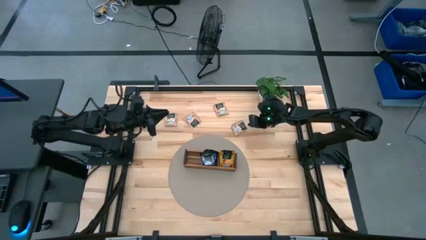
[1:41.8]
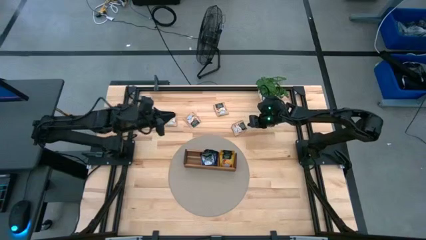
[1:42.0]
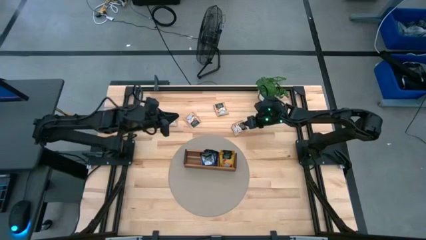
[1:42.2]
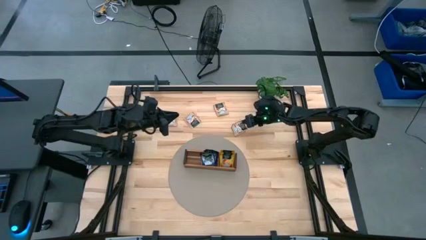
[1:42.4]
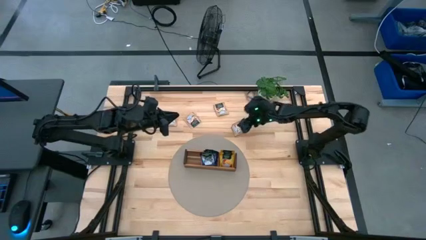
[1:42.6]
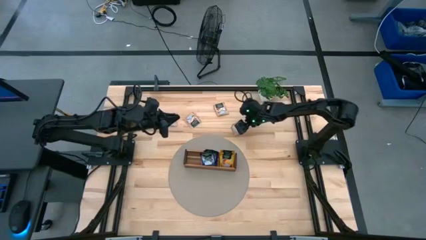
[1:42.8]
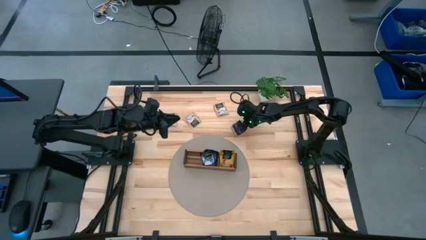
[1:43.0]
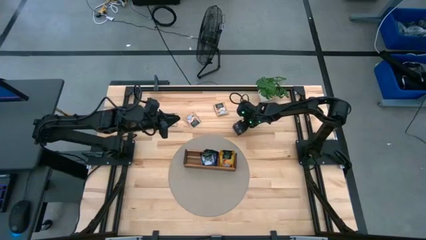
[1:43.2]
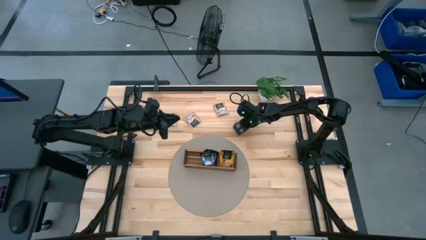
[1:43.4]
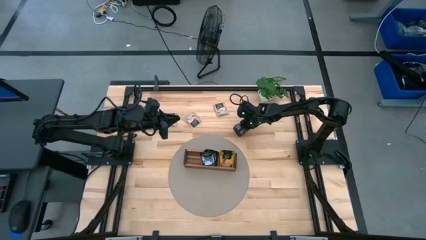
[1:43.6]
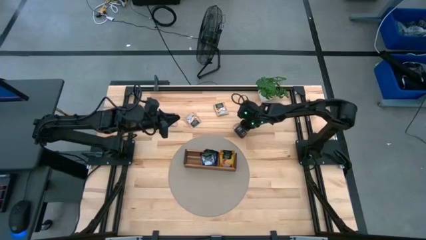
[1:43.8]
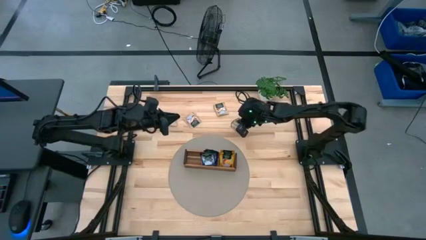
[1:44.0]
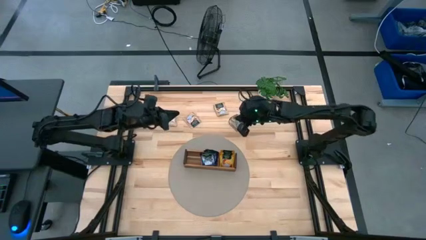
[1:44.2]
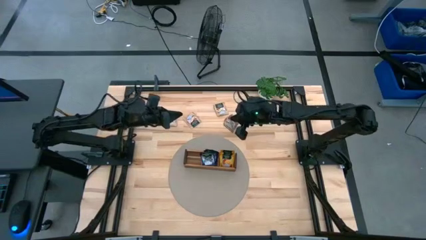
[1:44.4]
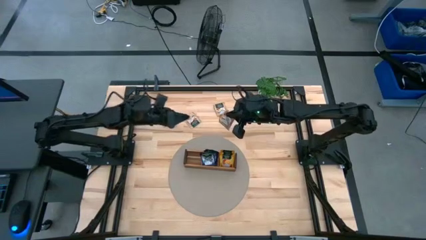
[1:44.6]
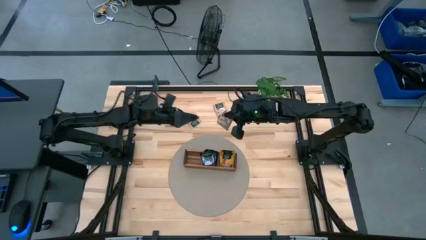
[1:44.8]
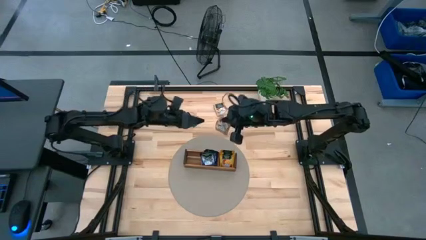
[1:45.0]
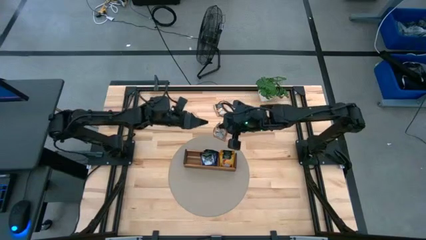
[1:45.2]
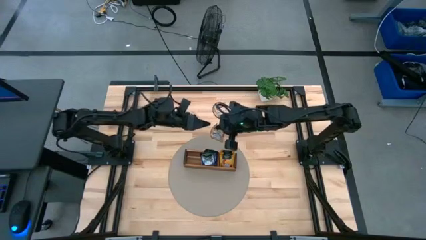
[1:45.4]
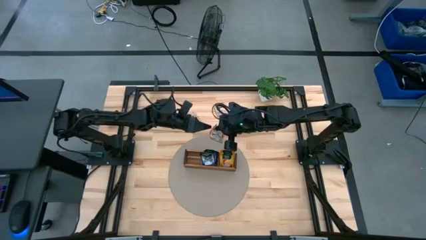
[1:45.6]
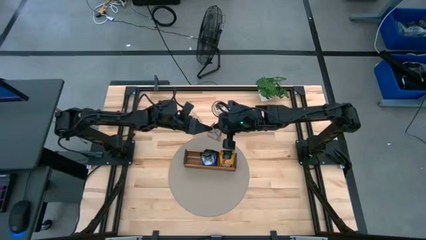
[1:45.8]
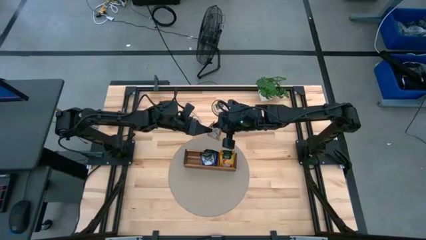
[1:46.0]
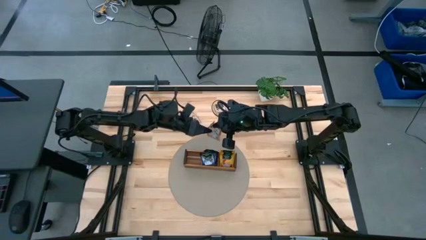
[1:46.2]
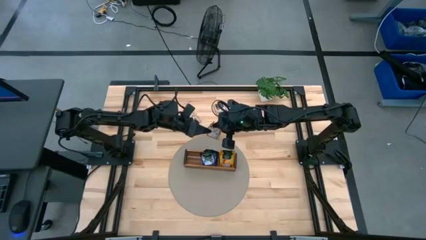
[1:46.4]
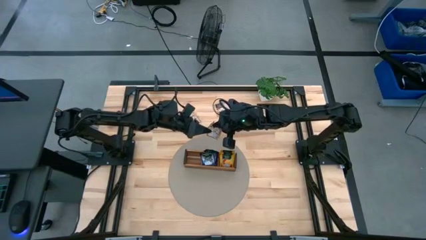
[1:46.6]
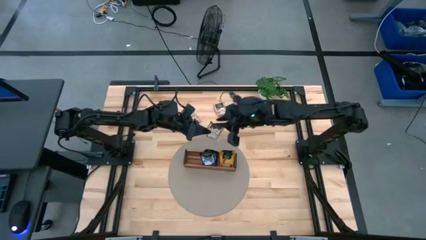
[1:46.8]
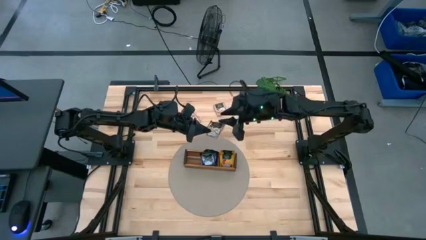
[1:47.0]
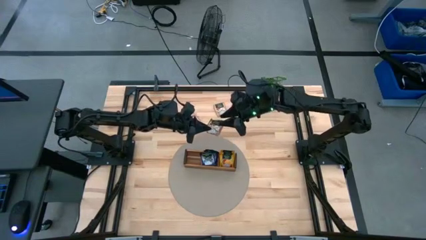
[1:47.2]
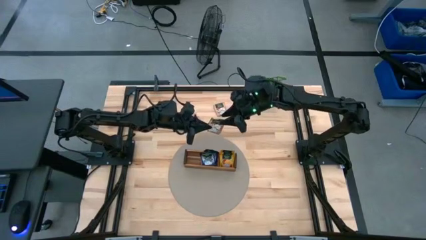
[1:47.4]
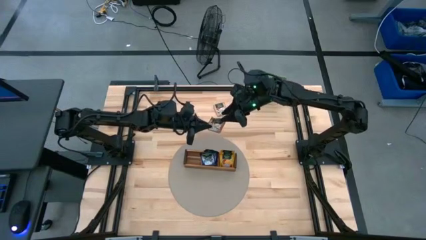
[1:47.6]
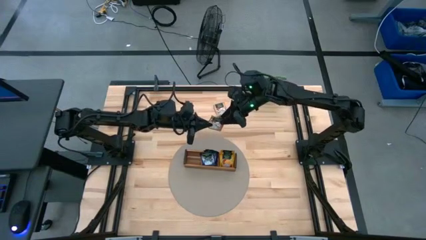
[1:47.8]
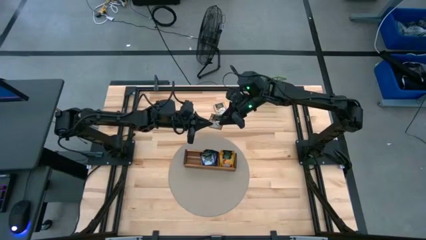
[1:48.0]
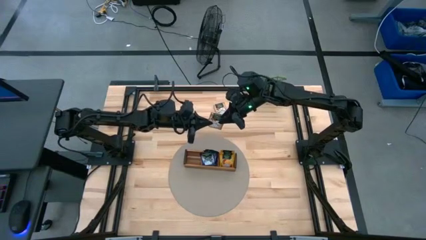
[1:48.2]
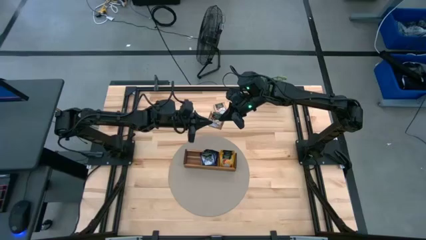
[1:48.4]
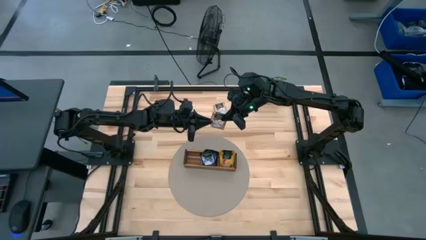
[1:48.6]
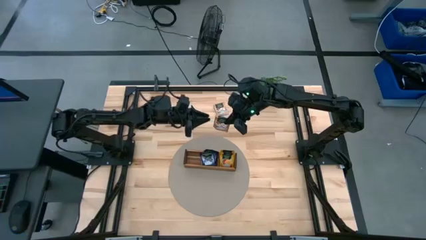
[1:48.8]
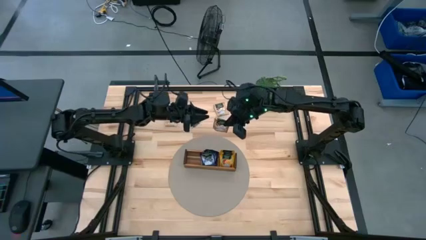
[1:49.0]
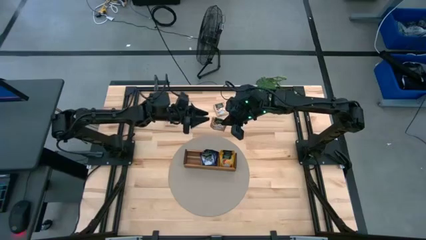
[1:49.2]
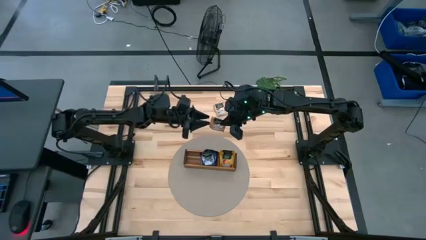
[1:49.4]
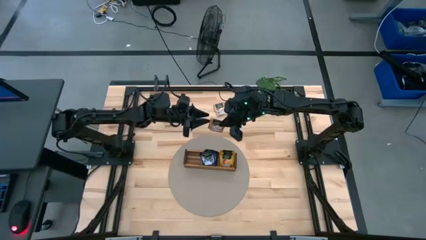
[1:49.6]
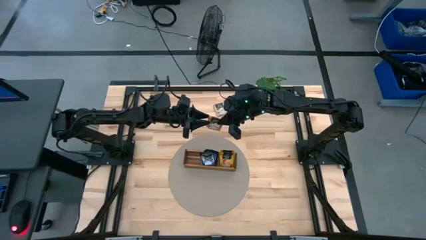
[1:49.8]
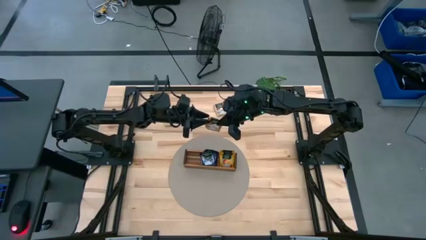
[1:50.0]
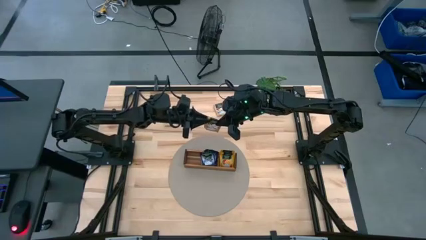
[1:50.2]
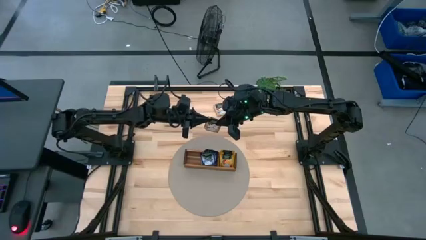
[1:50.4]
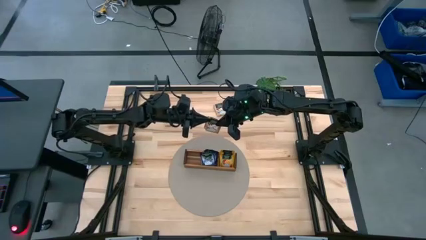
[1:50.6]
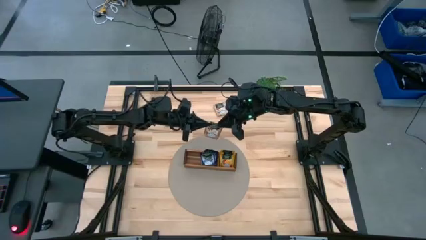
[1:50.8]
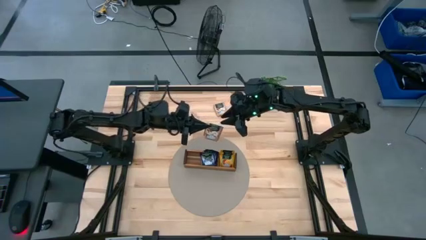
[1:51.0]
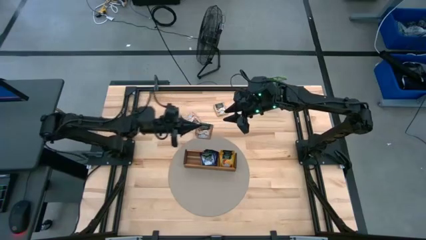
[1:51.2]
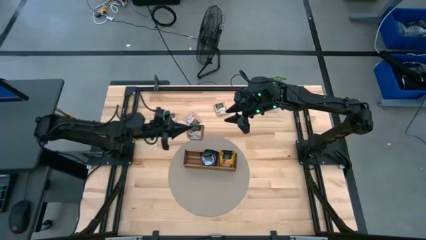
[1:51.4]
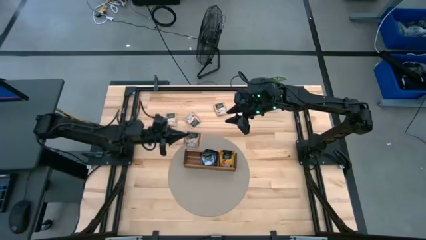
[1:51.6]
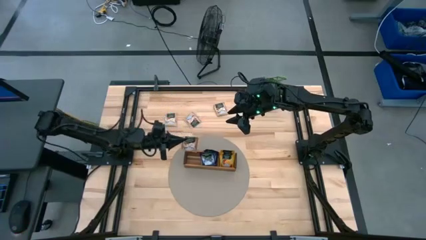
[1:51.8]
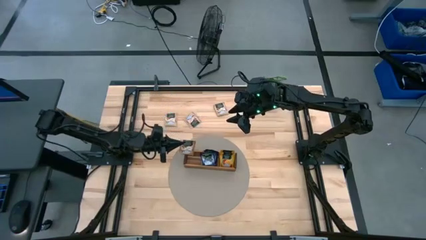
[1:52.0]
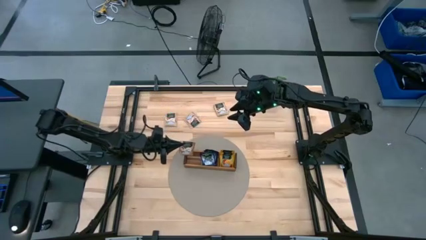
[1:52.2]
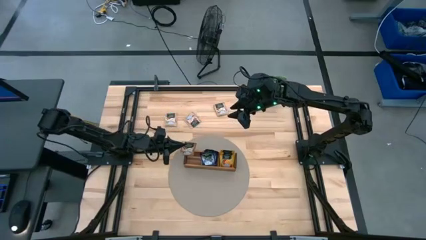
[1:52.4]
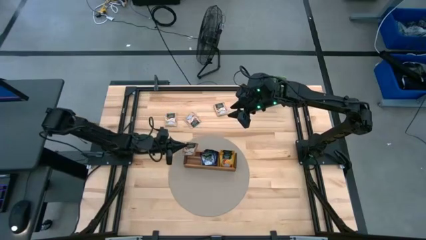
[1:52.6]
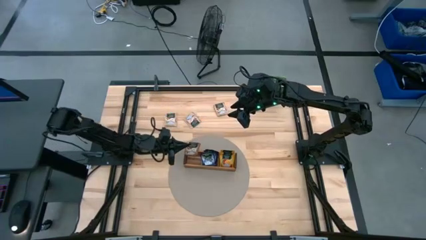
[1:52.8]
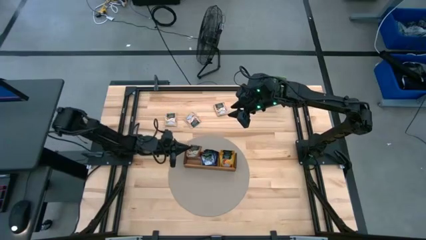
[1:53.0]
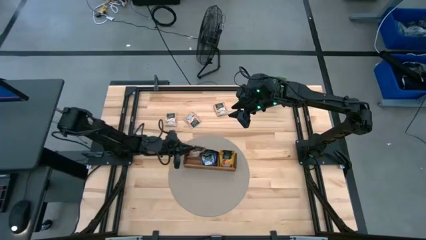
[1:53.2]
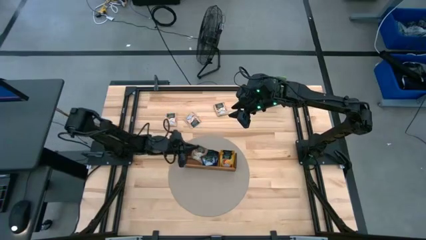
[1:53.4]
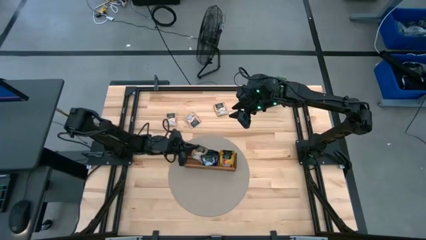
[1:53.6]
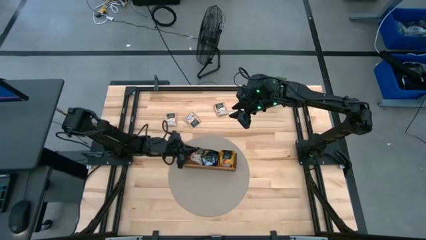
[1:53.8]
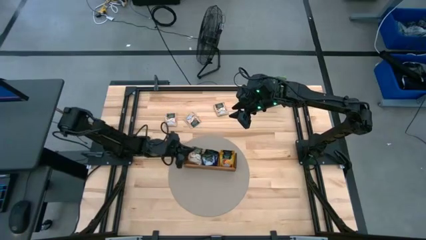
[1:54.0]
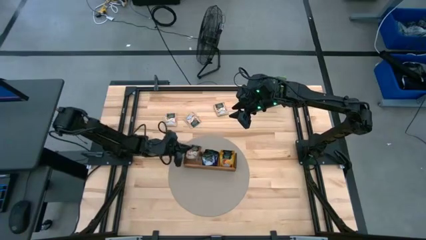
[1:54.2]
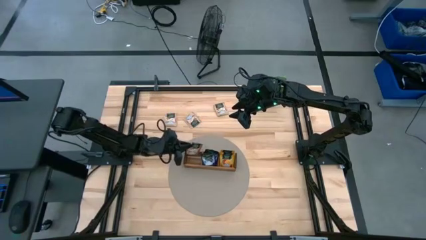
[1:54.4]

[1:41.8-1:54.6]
Task: Pick & Place Tea
Put the brown tea bag into the left section of the wooden organizer

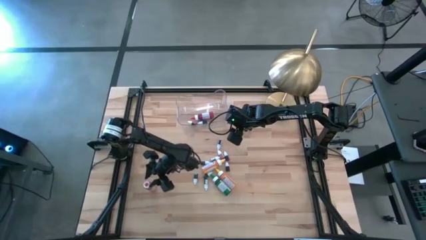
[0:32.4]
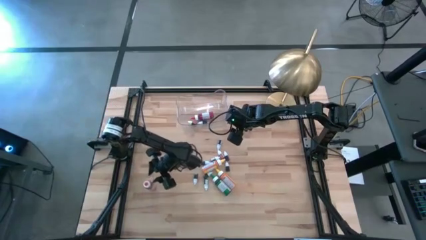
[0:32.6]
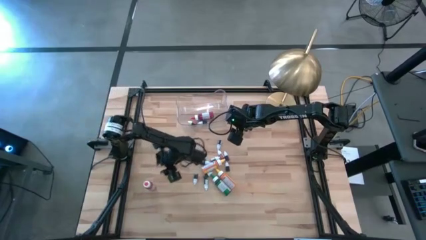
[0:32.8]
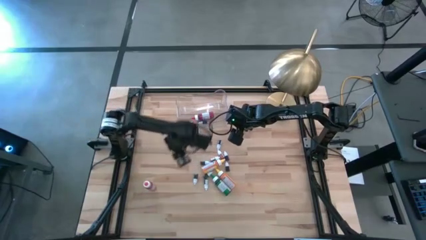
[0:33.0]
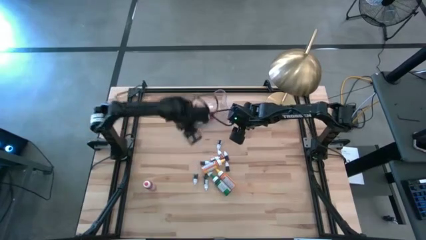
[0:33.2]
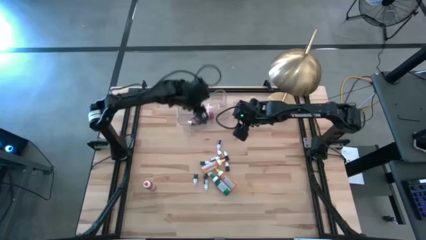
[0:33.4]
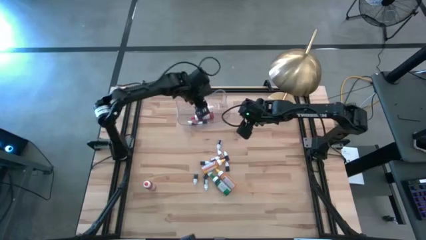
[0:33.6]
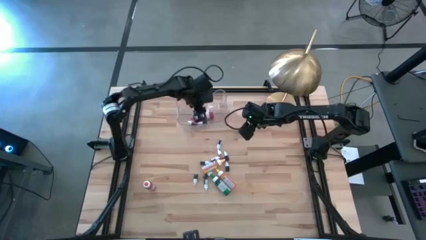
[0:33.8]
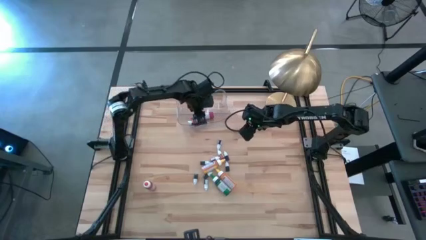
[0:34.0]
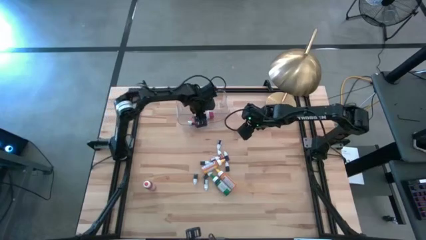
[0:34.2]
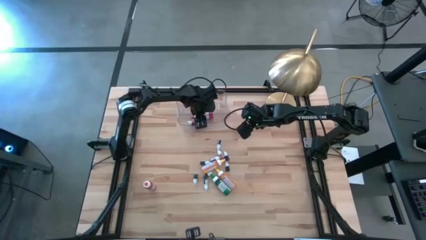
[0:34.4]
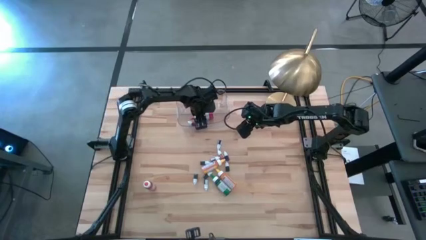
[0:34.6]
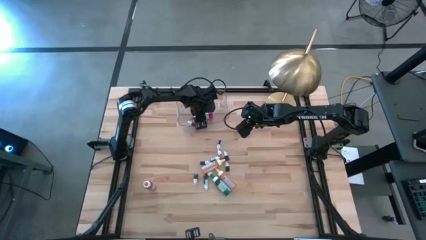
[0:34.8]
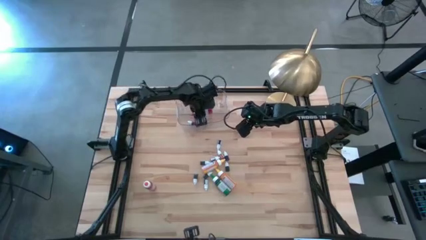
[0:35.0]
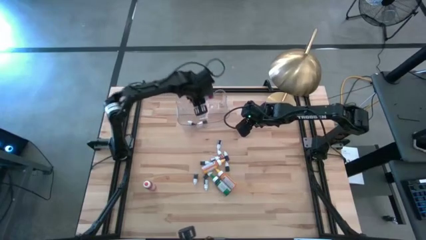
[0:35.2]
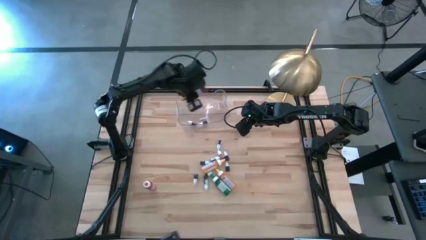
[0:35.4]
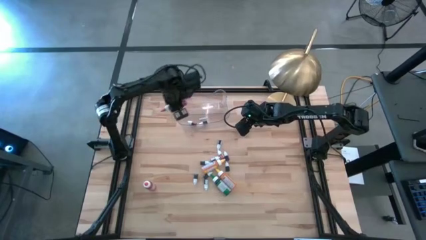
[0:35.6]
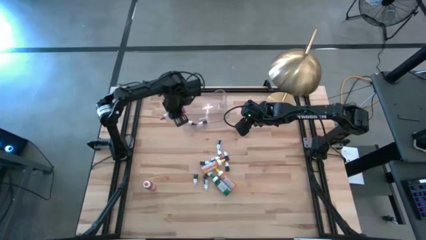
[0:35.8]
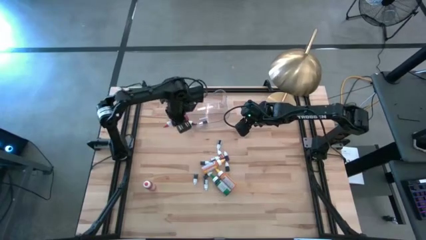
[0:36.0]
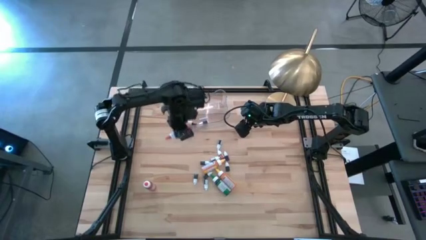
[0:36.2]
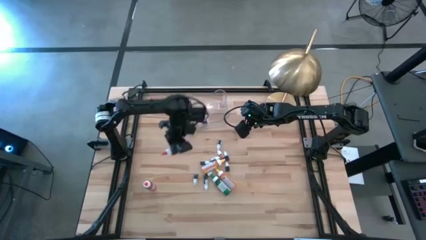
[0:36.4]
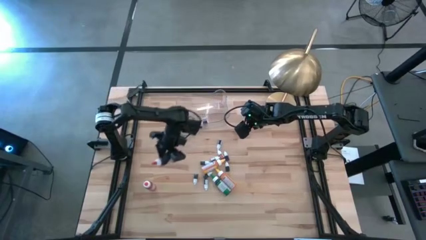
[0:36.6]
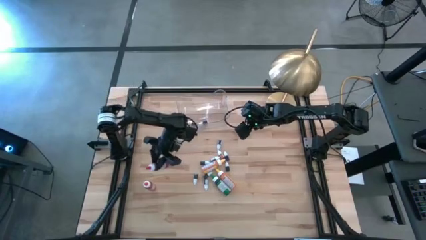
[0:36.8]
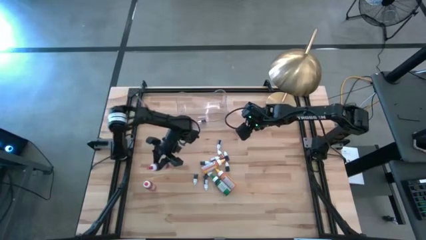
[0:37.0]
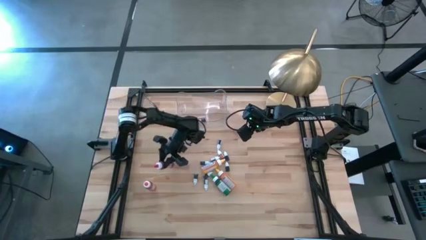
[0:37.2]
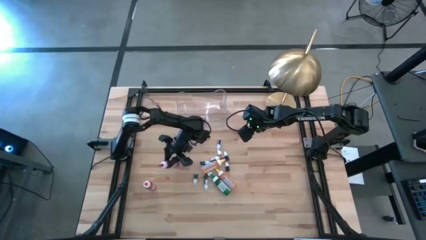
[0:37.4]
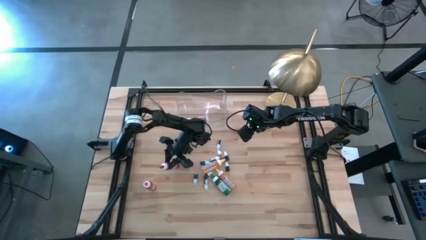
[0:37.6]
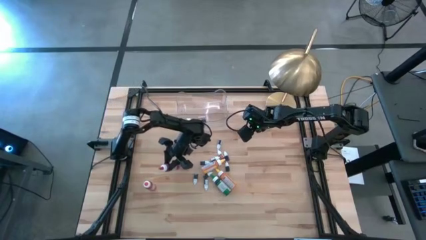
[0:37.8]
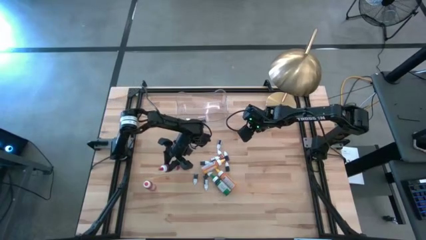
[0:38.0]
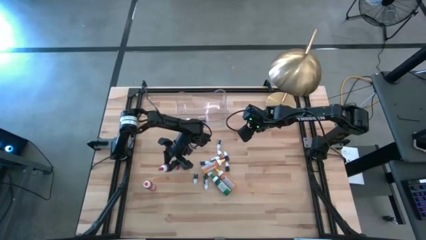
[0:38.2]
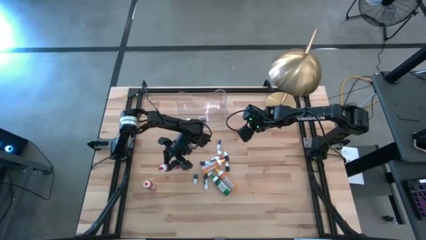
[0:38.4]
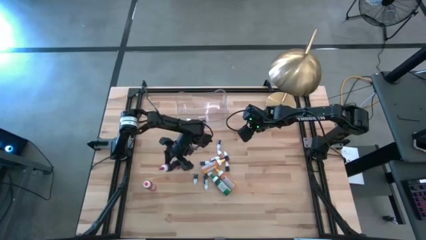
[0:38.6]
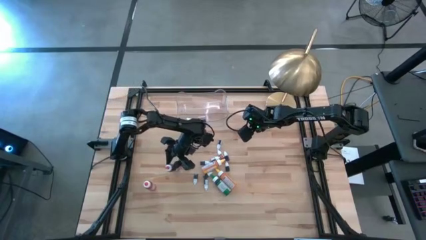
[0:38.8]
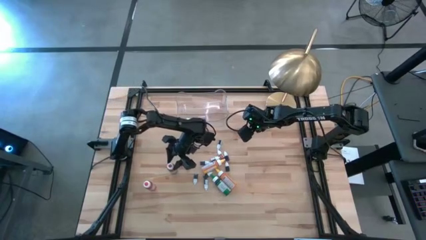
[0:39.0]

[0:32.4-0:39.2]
Task: Pick & Place food coloring
Remove the large red food coloring bottle from the transparent bin to the table
